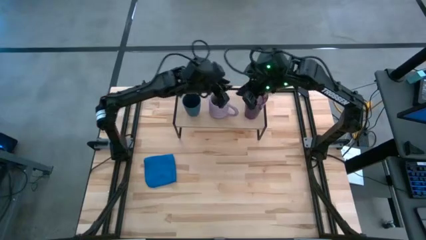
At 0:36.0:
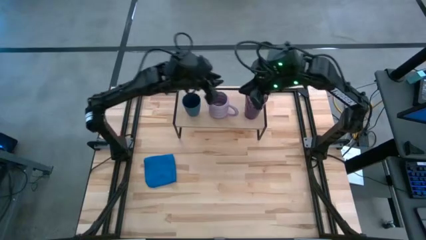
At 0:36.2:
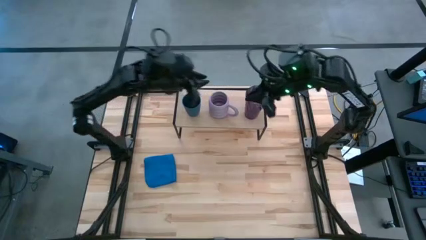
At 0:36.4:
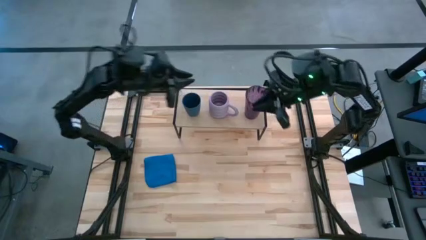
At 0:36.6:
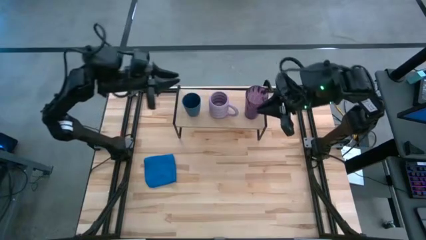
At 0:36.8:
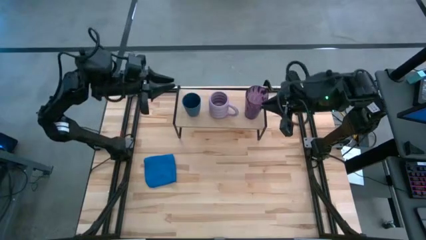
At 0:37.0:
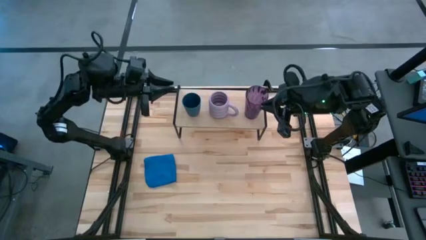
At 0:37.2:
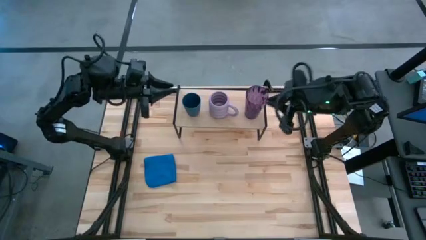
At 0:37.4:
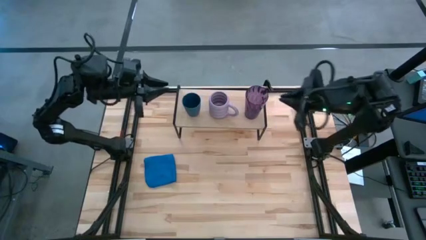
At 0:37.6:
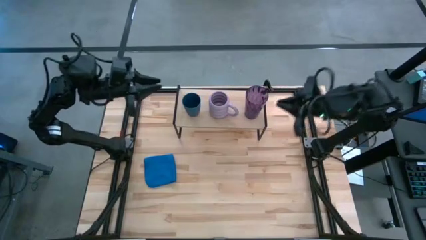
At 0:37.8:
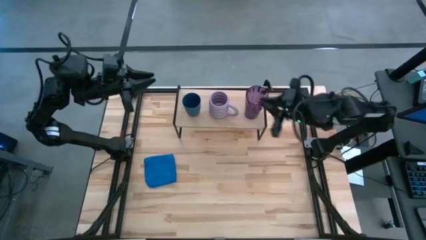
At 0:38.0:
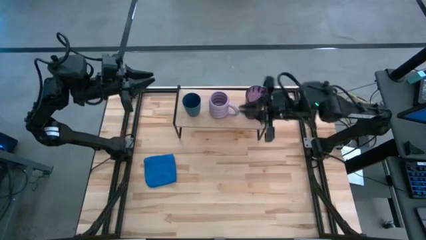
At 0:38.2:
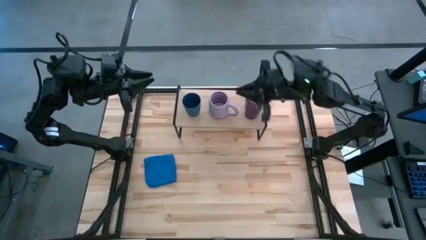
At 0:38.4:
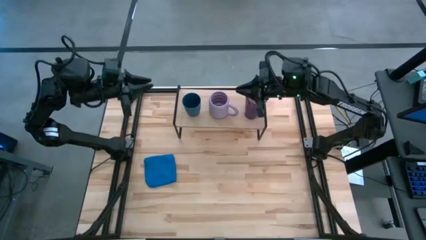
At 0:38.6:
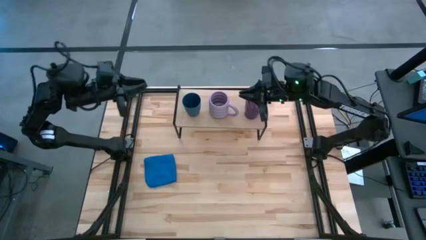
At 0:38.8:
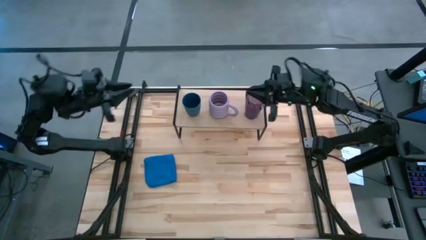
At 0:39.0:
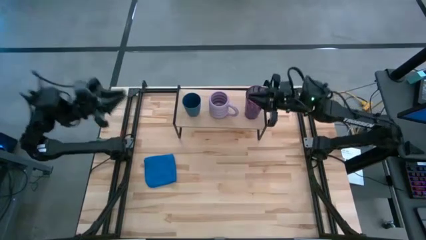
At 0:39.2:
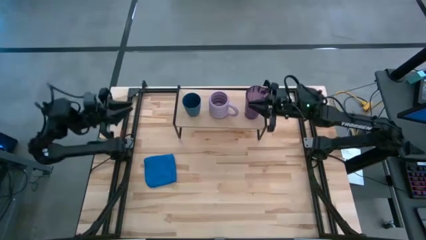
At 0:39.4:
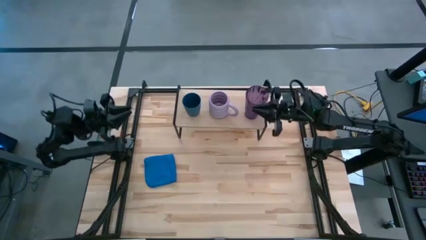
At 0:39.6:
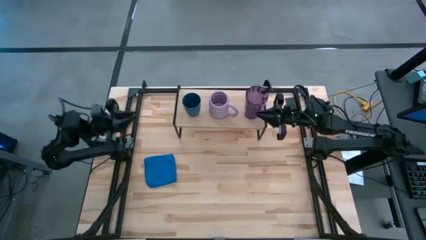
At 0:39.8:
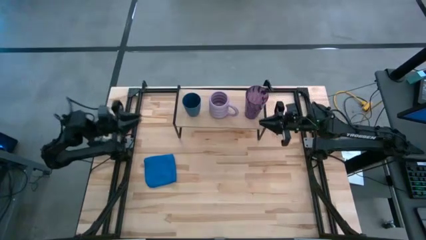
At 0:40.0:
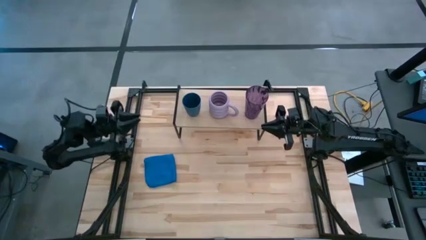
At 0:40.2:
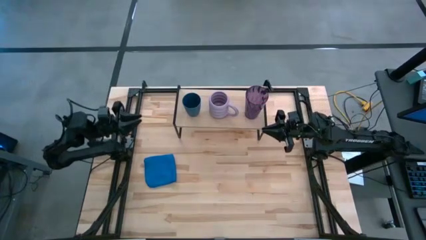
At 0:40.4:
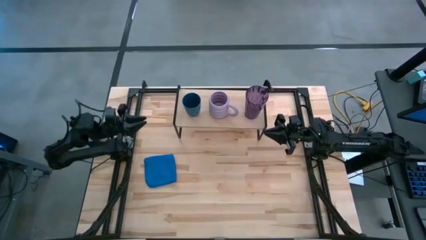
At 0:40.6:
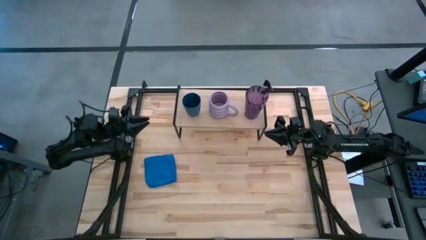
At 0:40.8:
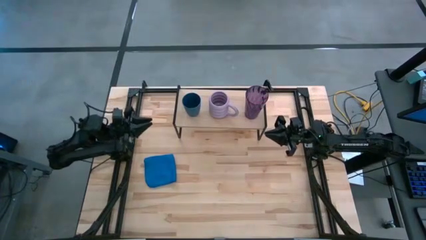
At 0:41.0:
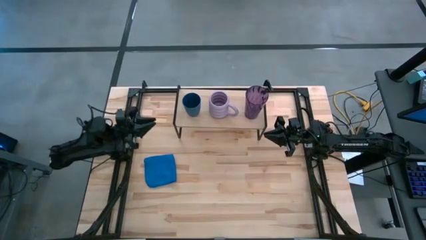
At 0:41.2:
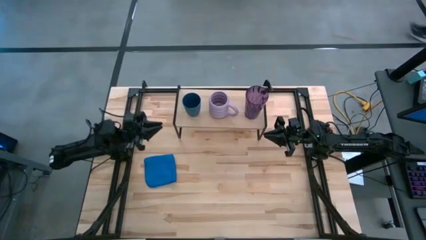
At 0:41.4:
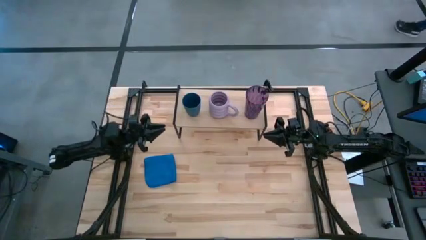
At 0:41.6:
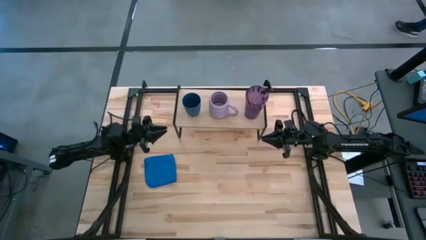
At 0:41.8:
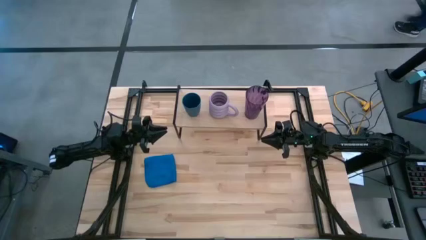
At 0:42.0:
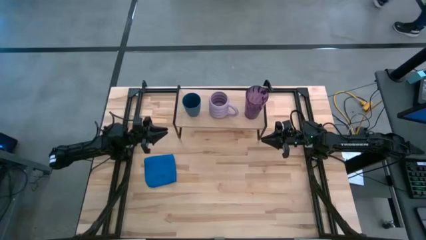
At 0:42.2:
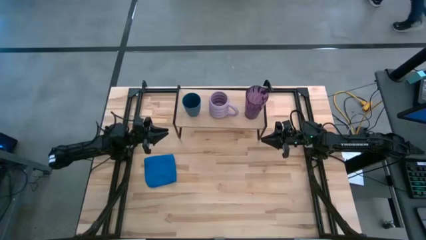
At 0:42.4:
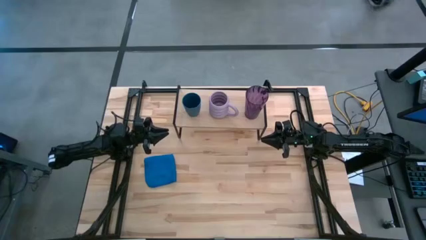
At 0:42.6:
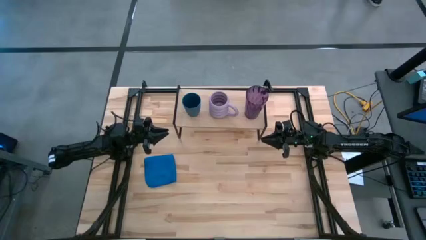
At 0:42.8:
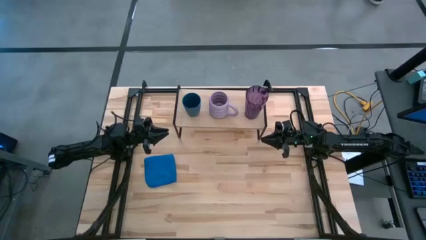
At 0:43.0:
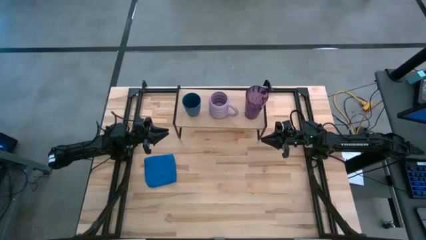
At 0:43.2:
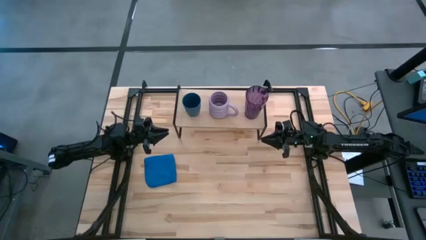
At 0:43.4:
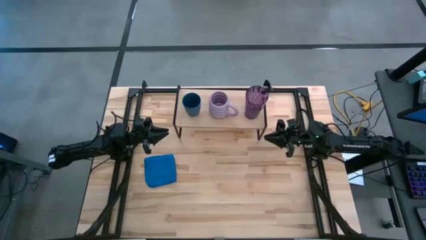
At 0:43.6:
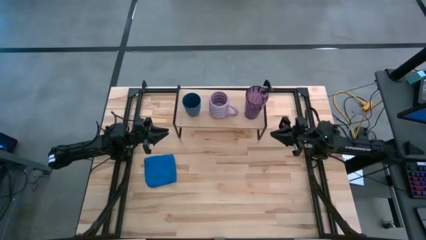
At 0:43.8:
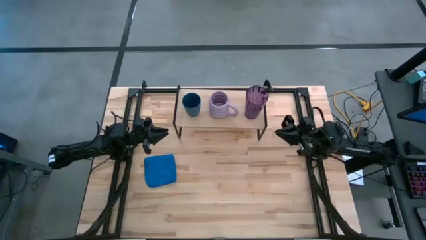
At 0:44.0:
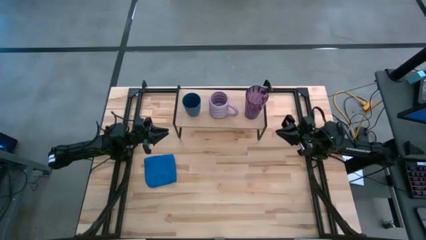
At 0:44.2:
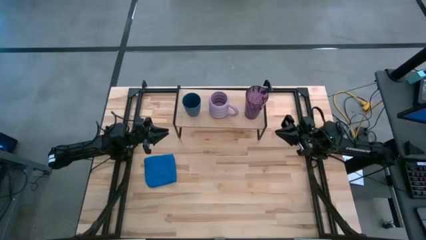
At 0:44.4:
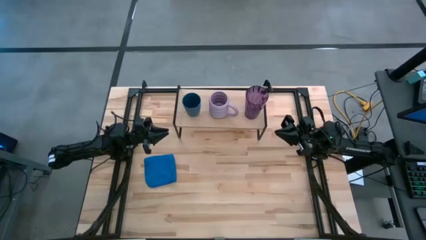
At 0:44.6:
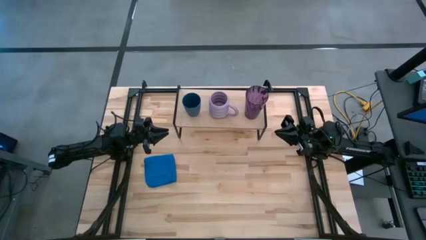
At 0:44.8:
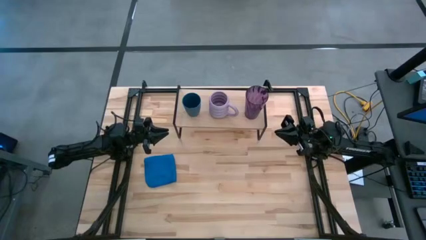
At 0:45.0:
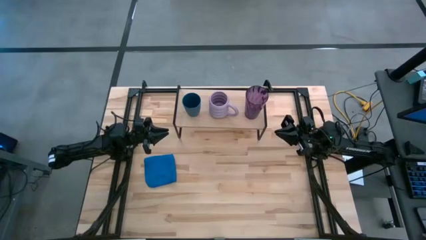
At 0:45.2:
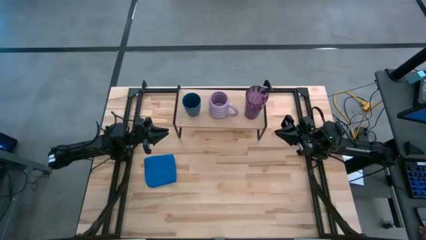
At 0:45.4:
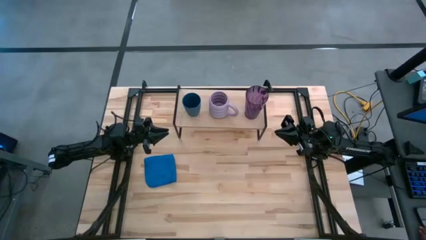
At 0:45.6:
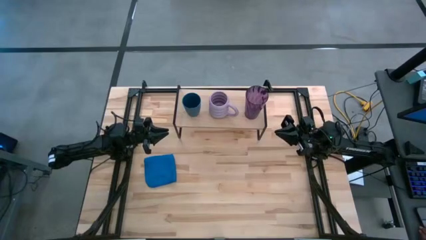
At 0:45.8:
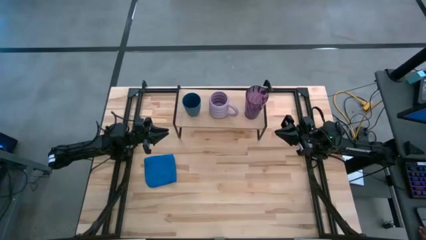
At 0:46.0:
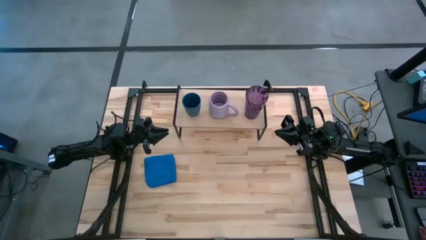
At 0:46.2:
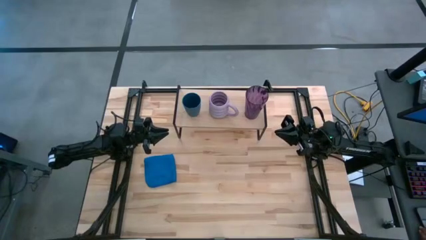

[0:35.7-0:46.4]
Task: Stack small to large cups/mugs on shelf
Return to Home position

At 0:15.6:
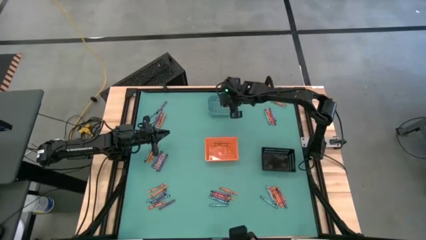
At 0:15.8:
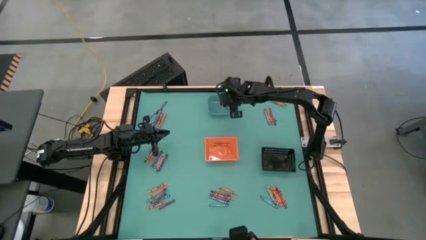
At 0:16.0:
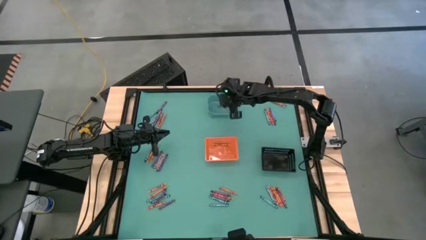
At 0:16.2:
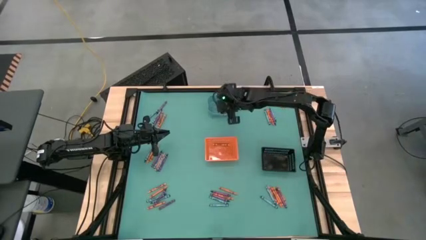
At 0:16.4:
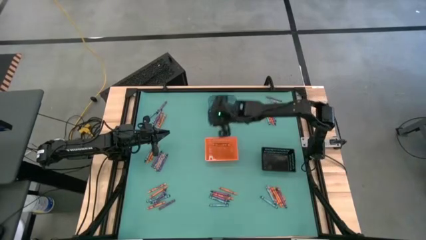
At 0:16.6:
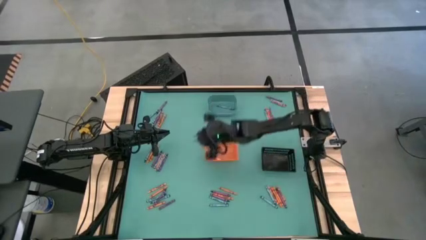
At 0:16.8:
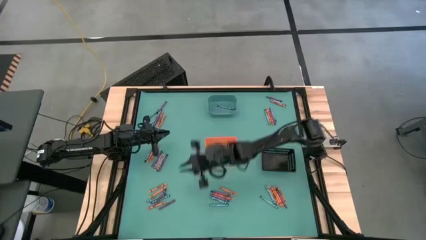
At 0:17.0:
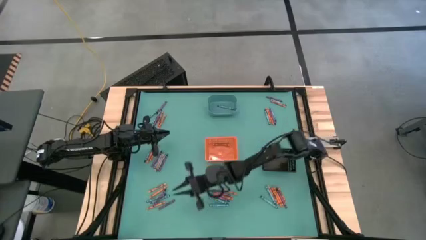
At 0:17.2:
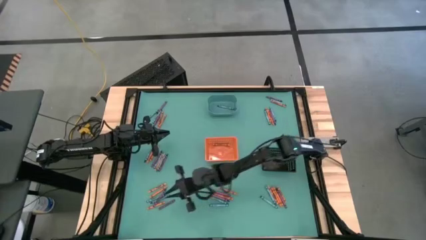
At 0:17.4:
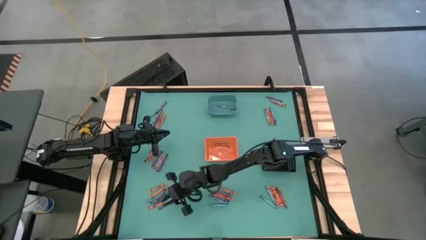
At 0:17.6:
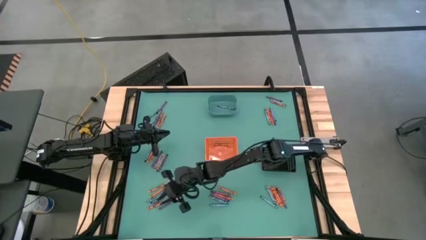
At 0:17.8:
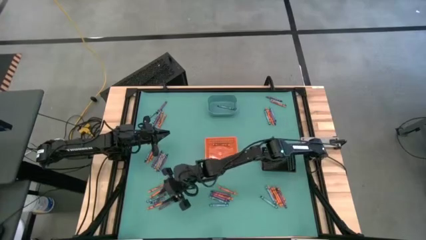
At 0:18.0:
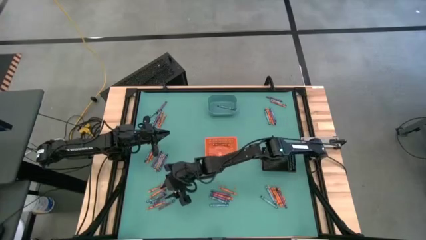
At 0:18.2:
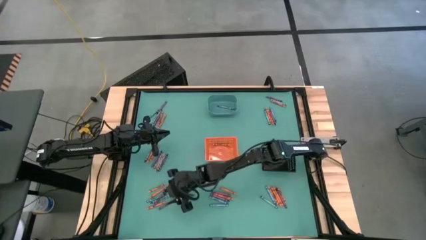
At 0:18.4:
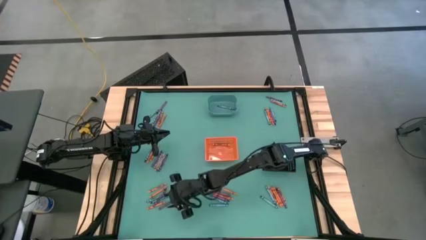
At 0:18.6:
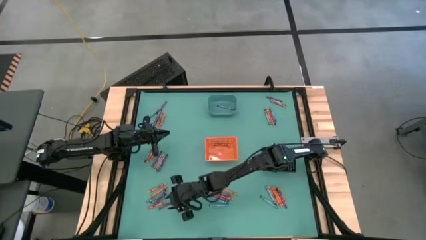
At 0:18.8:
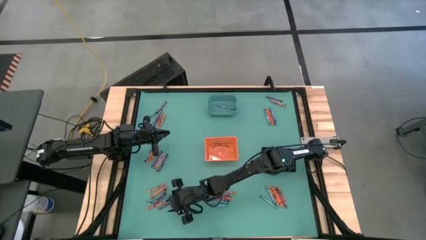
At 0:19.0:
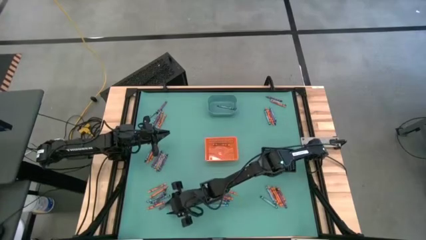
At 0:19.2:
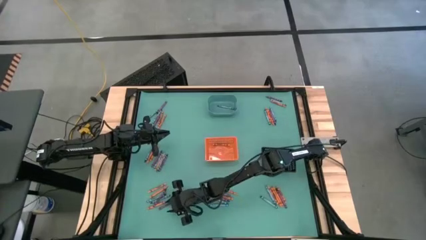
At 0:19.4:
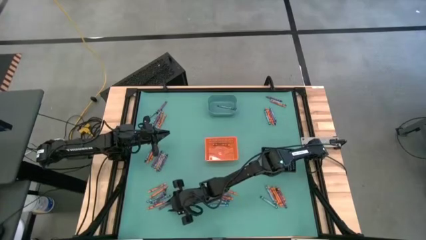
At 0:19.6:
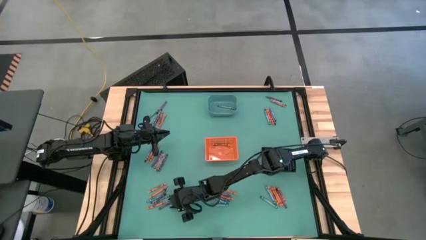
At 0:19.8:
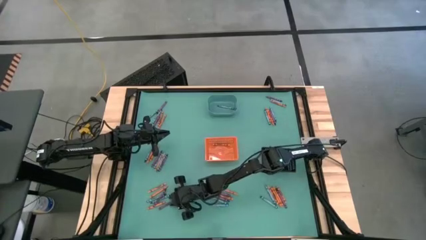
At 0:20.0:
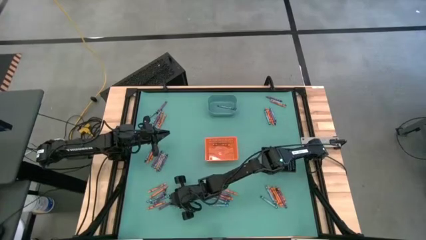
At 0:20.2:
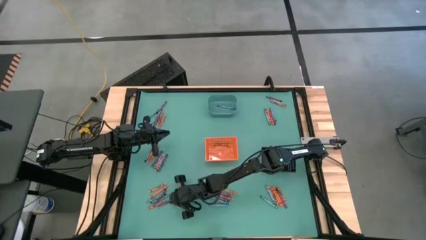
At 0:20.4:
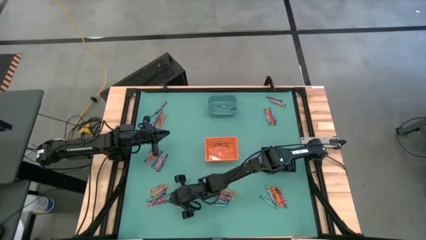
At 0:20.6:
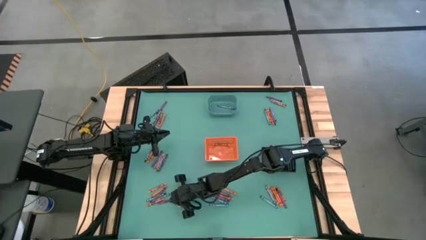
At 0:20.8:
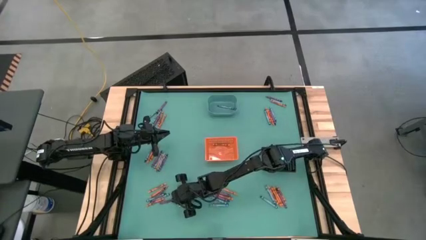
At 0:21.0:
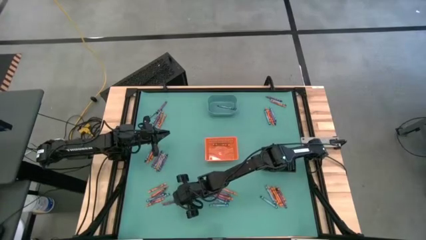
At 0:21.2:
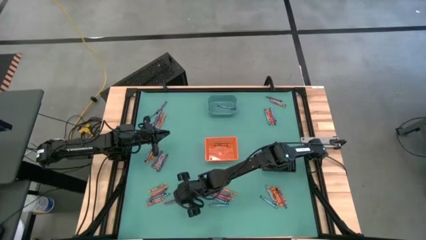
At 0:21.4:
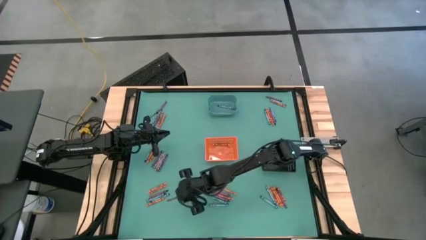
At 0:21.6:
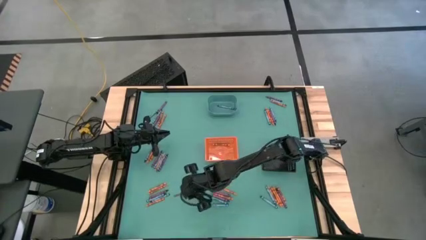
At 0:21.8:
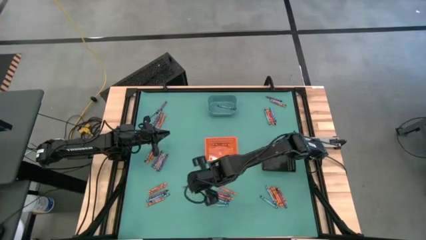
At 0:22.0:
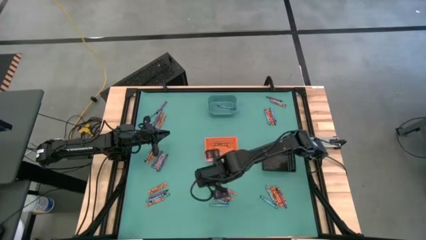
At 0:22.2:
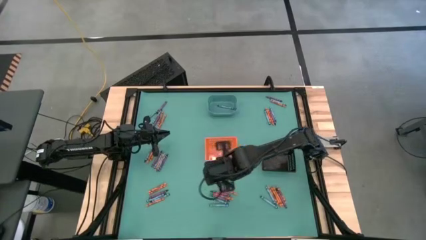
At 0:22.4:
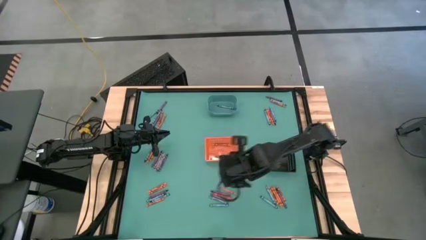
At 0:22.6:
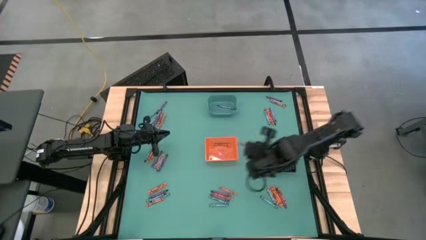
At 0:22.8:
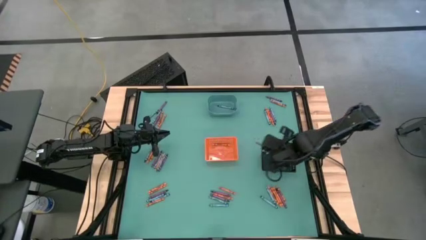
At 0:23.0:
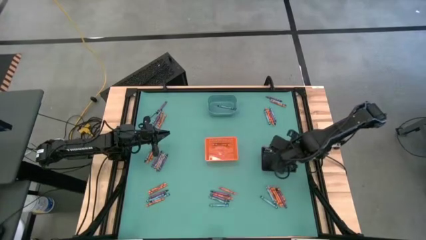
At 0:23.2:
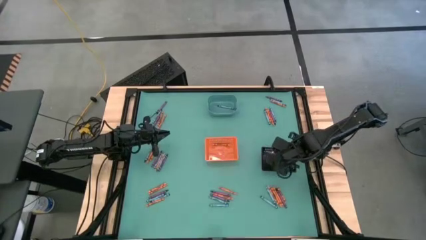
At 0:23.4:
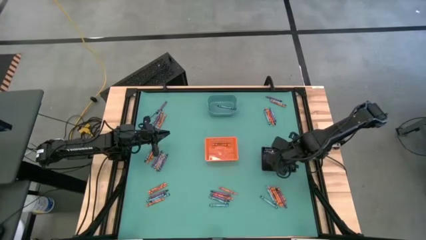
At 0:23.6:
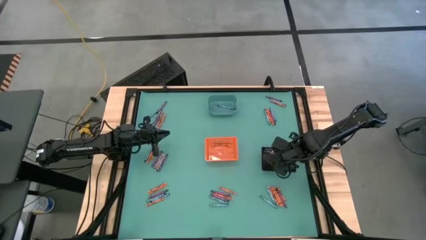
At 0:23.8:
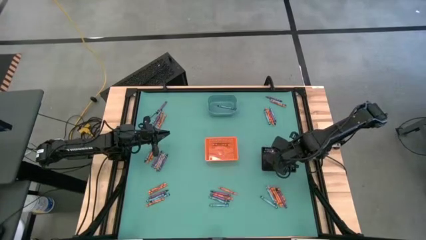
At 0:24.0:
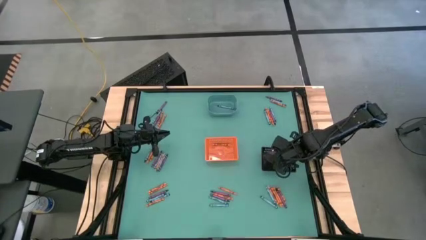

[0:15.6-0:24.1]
Task: Sort crayons
Put the violet crayon into the black bin
